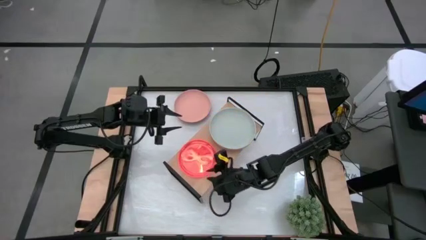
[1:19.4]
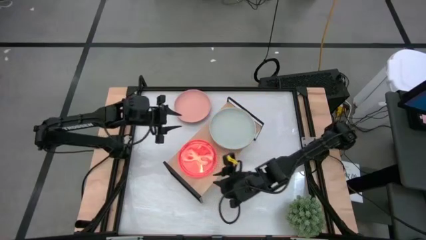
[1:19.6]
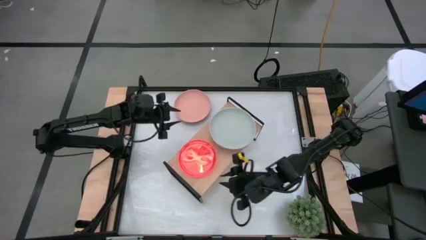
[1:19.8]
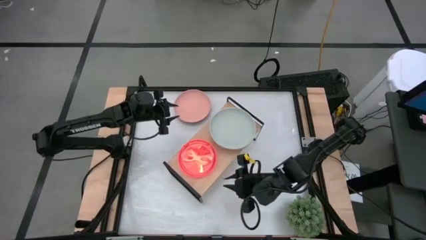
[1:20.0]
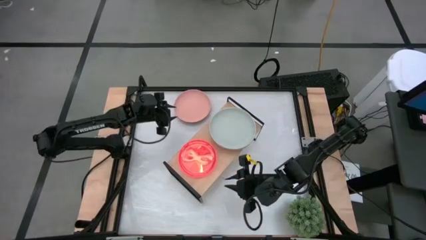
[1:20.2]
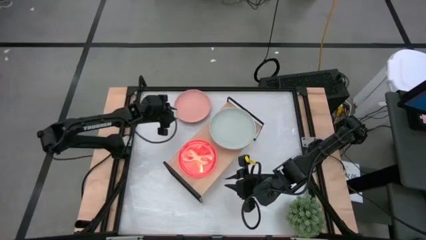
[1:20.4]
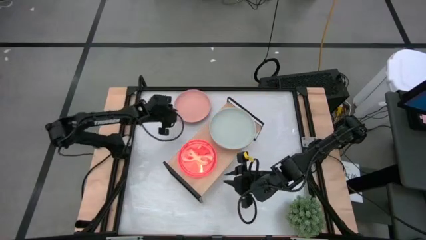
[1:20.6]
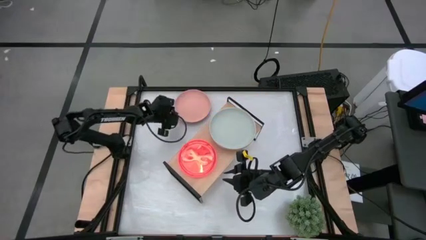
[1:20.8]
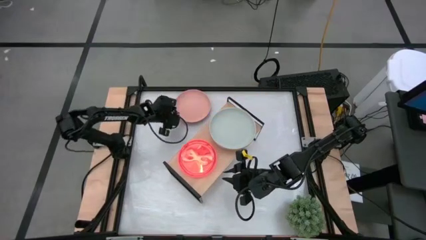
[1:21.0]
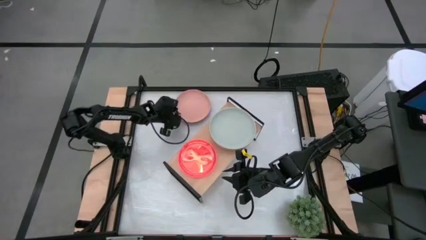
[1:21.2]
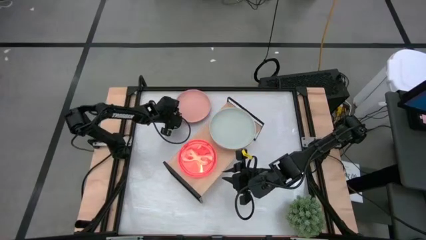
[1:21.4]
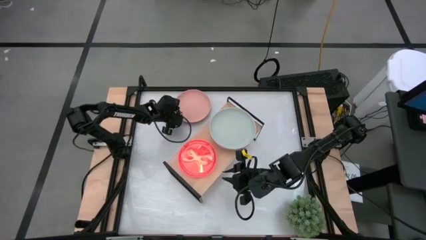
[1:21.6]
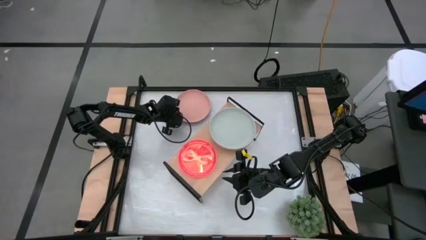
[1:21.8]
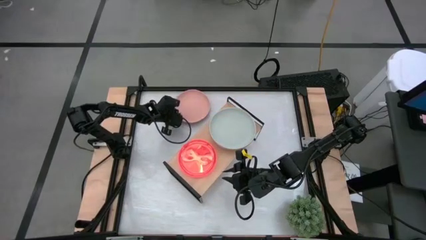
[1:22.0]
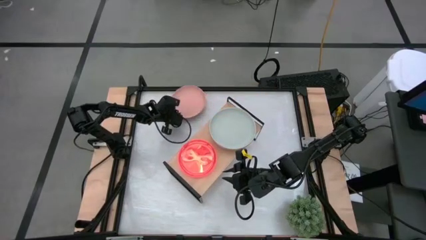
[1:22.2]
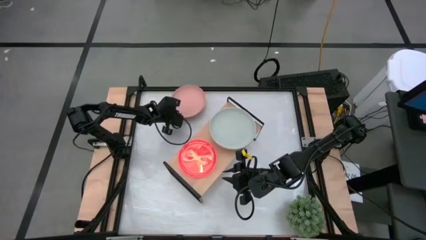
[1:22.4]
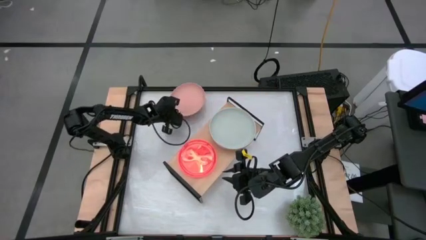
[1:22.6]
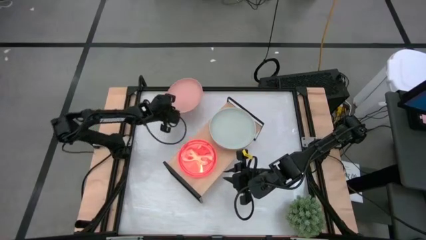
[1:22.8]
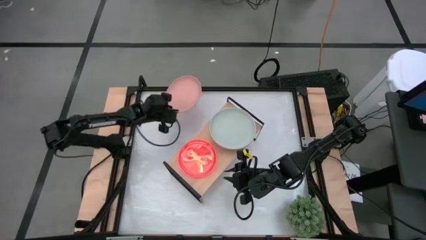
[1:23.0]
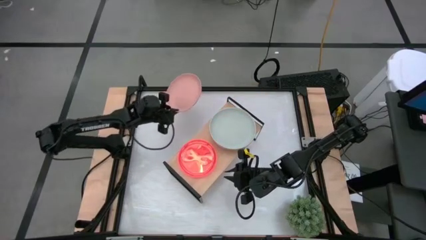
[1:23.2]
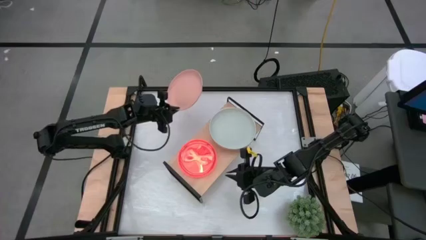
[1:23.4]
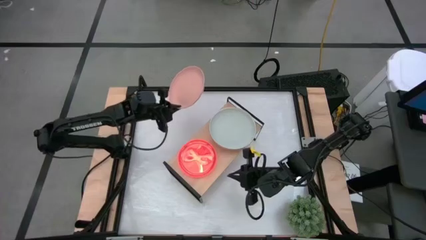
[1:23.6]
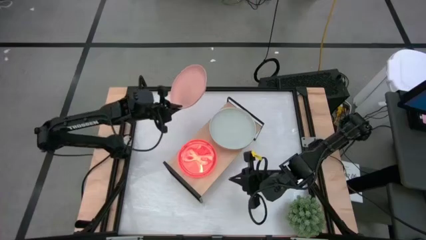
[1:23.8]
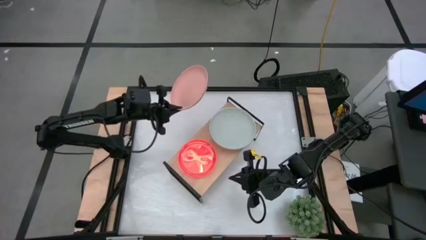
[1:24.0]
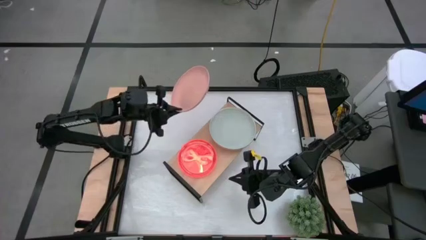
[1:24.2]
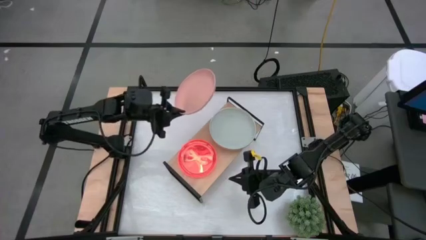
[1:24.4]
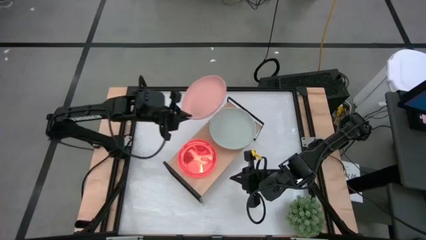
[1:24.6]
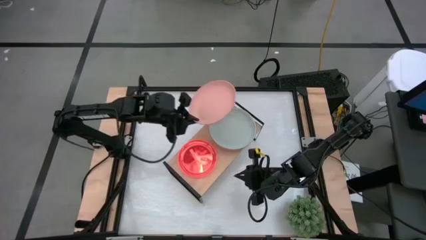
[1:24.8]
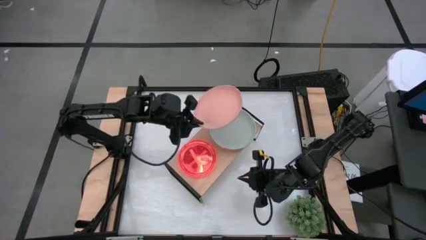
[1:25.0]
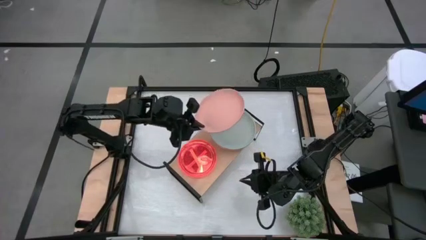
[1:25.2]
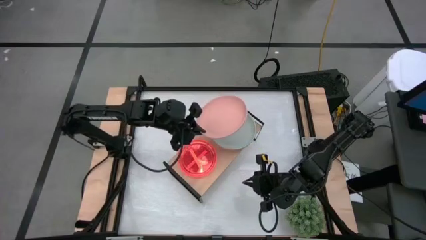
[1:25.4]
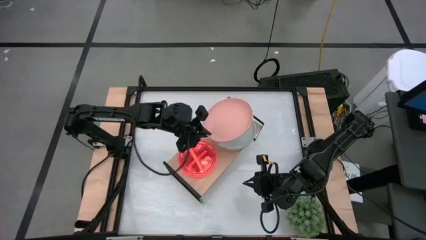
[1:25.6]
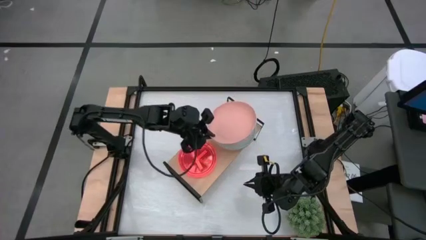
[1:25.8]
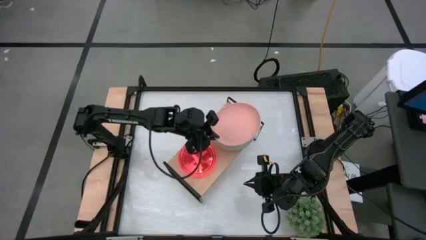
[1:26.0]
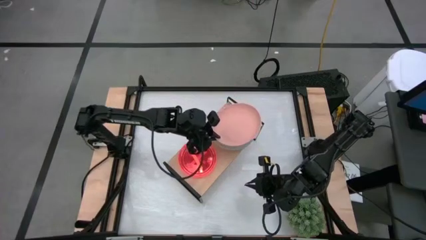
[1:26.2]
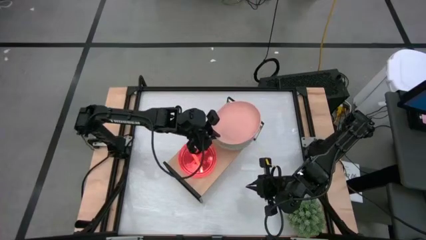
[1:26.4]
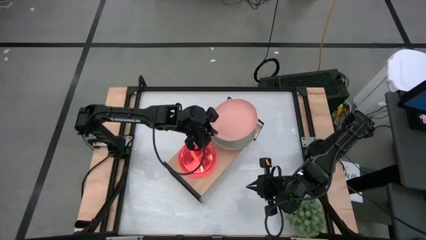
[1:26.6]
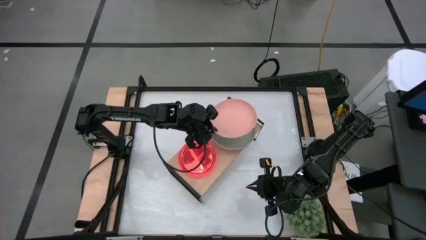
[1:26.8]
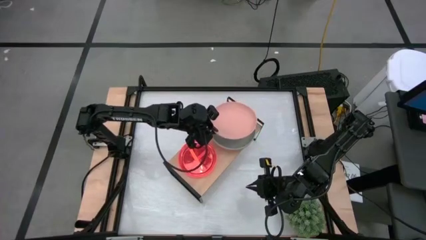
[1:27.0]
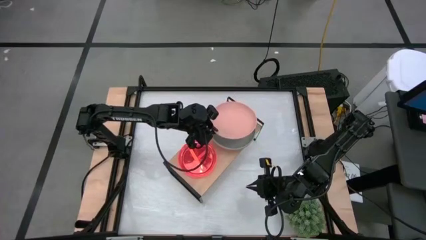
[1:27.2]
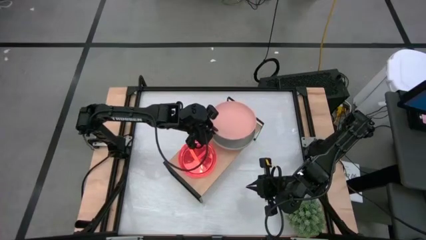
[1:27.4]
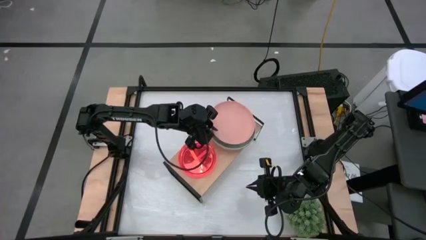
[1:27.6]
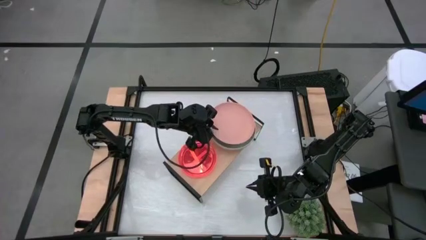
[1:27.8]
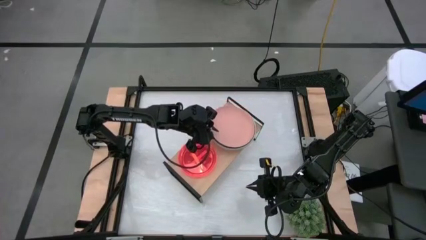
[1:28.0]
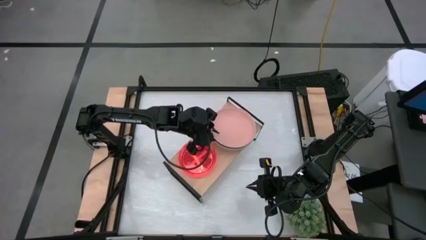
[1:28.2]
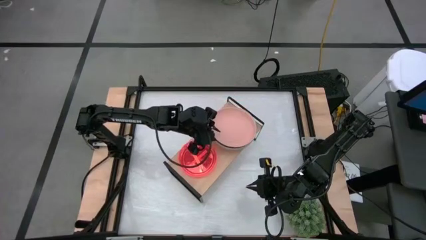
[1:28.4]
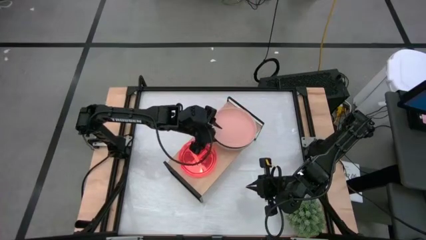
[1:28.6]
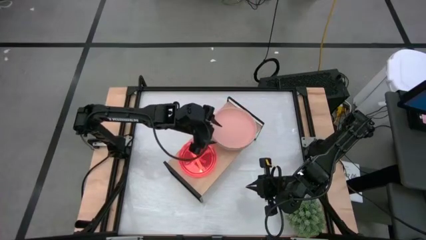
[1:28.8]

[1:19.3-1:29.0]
Task: Place and stack plates onto a shelf
Stack the big light pink plate on top of the big gray plate on the shelf
